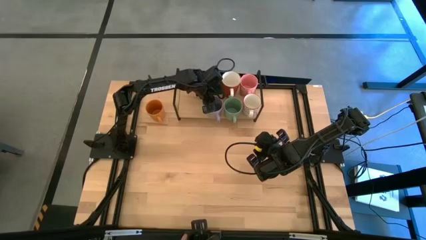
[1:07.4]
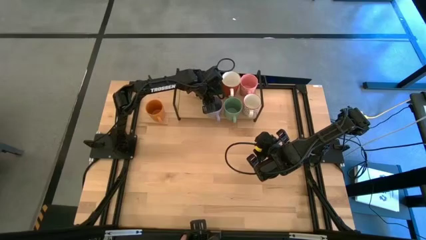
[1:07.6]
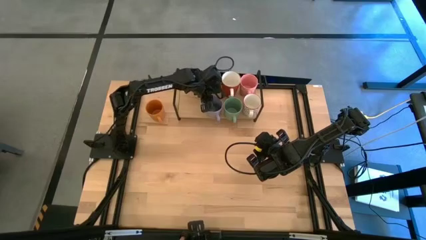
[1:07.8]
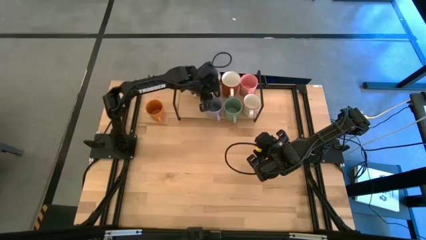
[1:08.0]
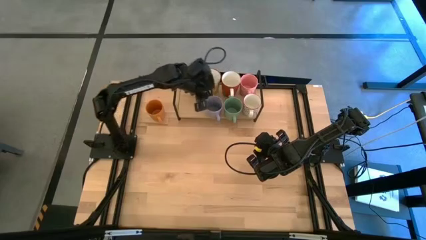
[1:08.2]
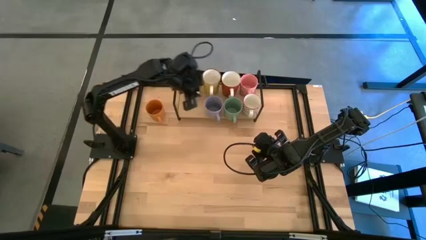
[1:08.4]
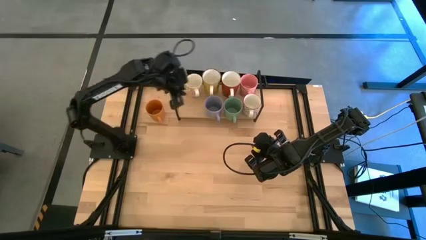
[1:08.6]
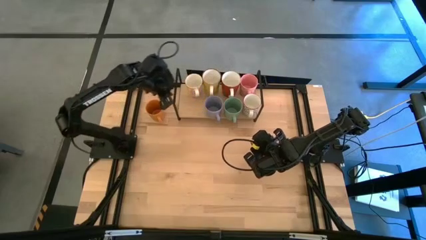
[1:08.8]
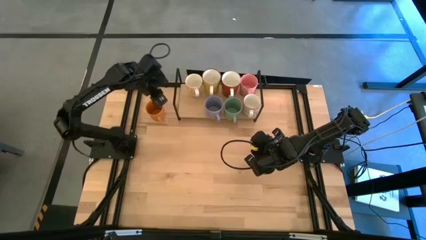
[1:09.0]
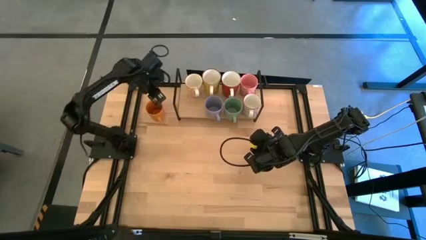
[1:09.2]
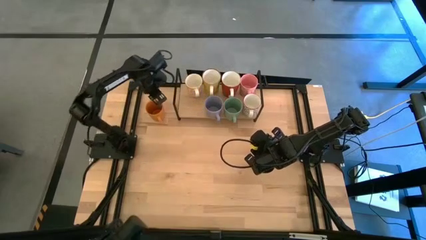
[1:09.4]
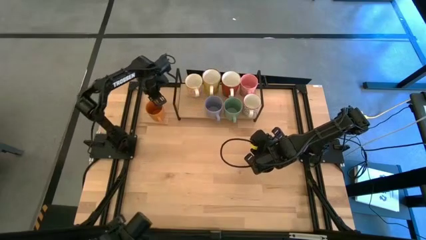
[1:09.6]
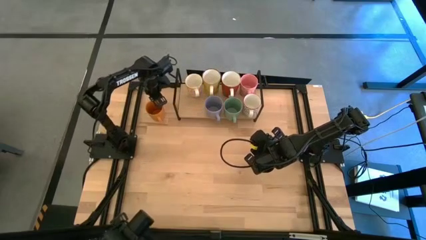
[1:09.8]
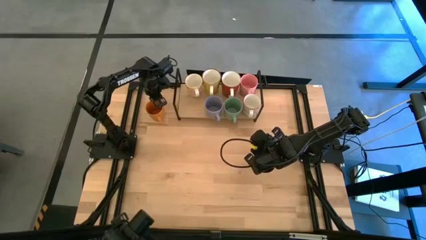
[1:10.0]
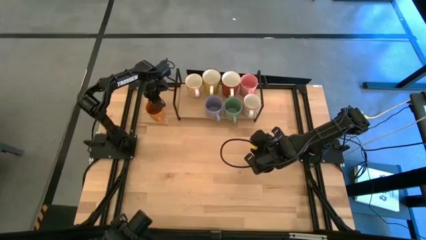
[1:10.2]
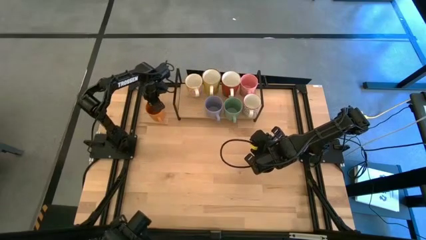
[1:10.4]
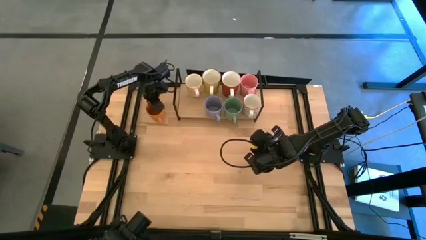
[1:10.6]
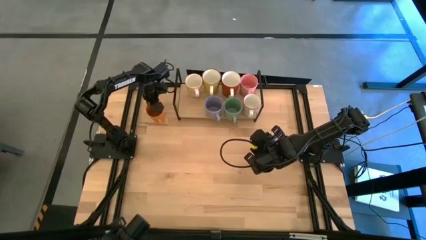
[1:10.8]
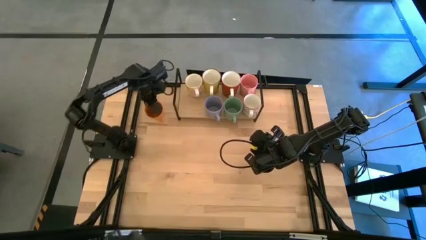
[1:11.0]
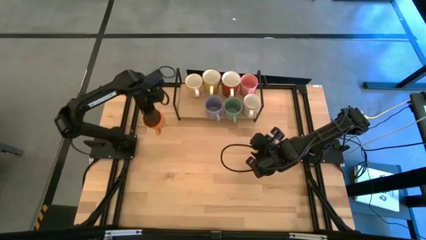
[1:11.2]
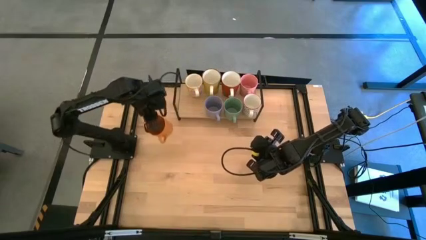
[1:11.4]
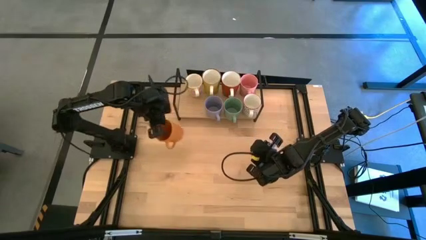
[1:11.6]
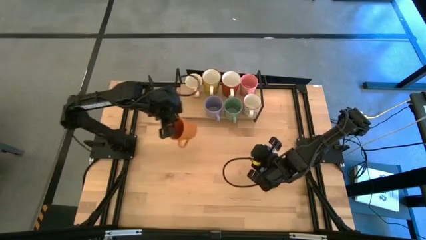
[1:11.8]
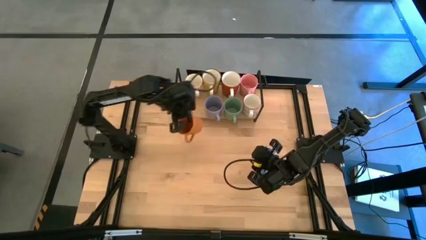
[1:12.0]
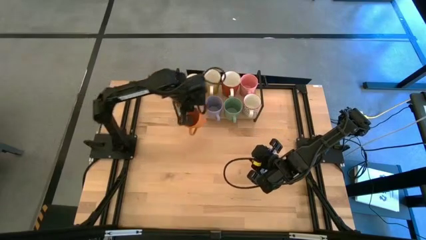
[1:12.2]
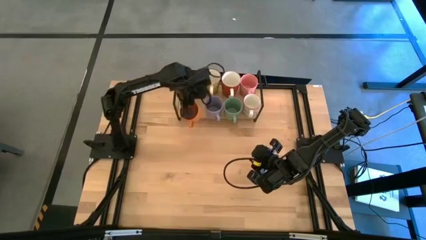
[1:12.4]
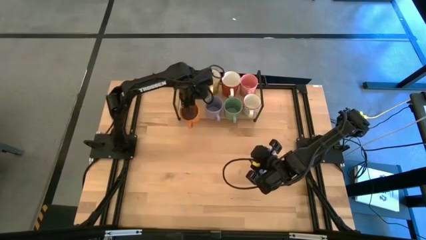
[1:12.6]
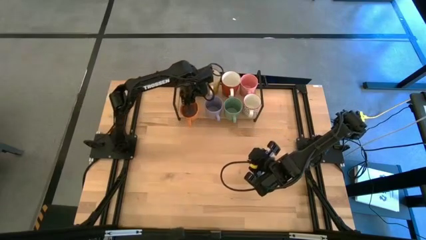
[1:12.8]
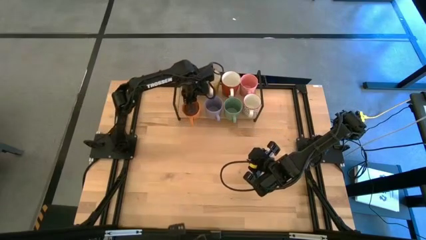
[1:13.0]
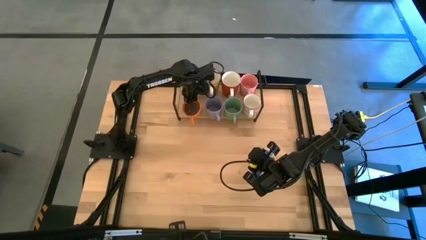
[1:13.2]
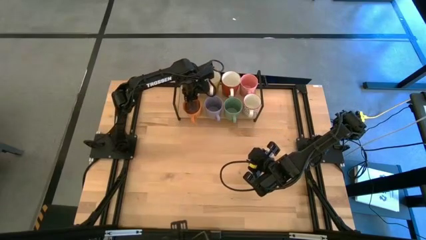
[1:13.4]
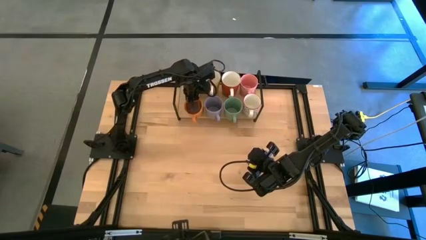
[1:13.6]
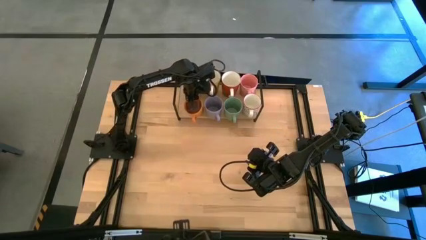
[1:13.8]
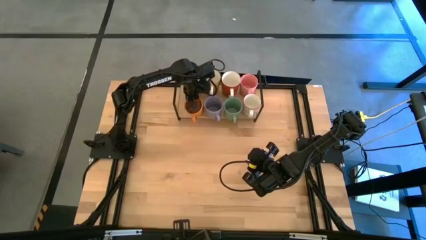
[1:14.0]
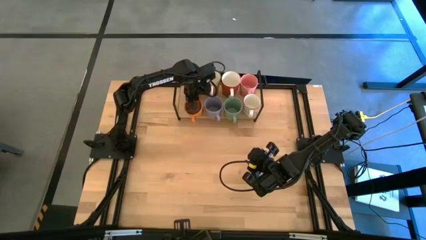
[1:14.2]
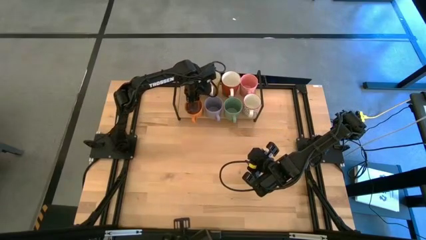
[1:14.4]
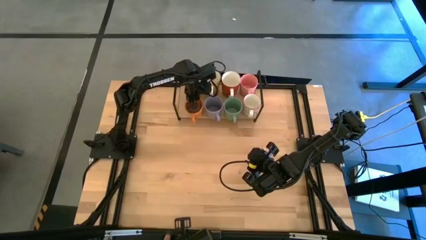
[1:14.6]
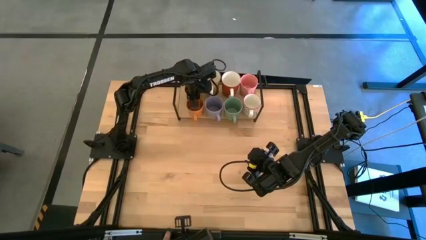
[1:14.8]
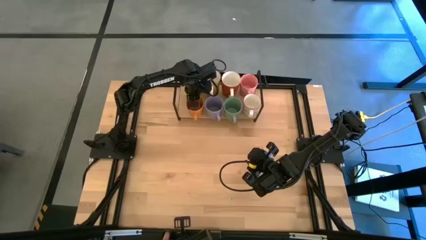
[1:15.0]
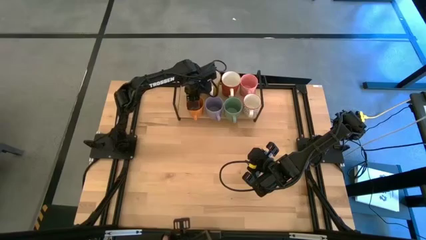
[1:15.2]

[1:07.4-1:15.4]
Task: Place coffee mugs
Put the orange mug on the shelf

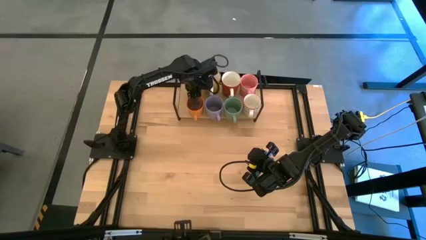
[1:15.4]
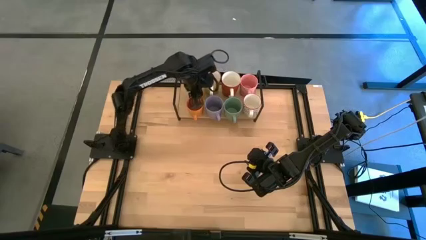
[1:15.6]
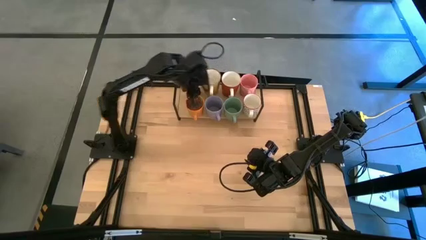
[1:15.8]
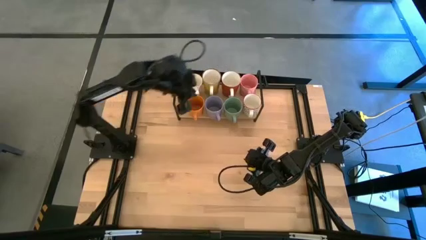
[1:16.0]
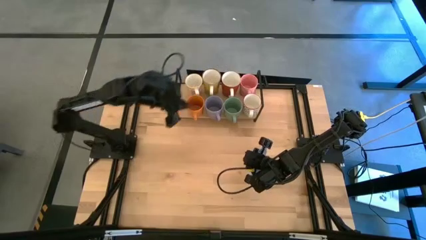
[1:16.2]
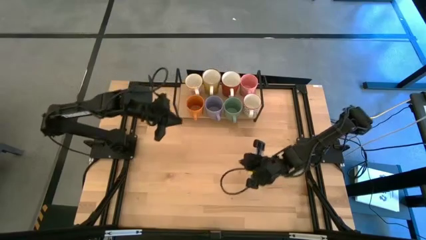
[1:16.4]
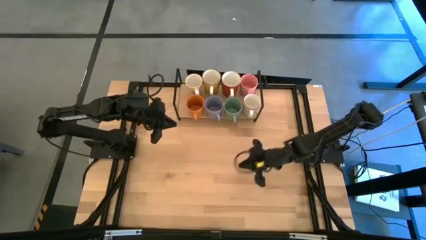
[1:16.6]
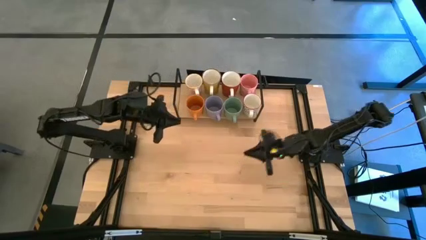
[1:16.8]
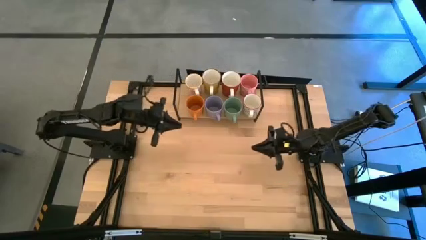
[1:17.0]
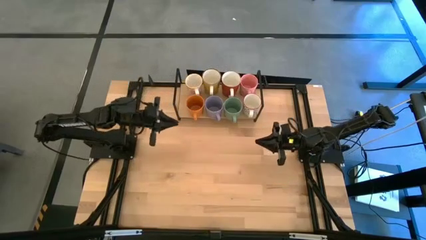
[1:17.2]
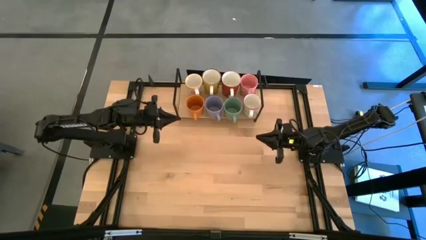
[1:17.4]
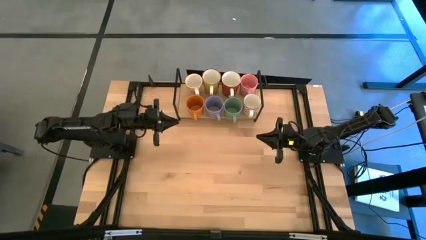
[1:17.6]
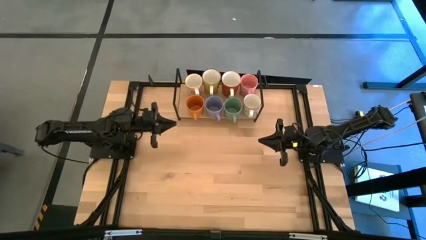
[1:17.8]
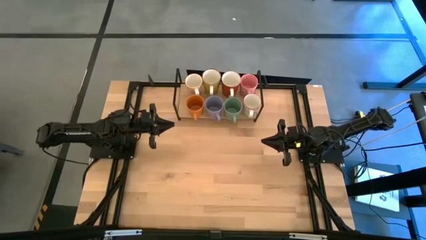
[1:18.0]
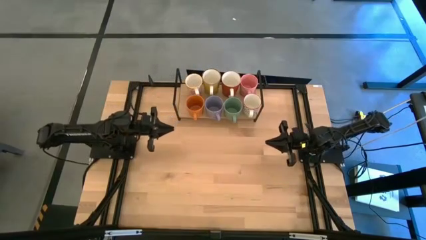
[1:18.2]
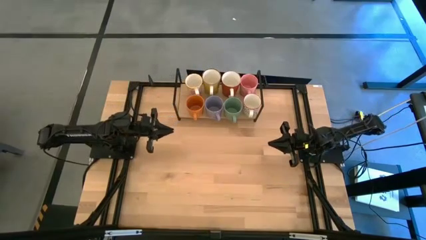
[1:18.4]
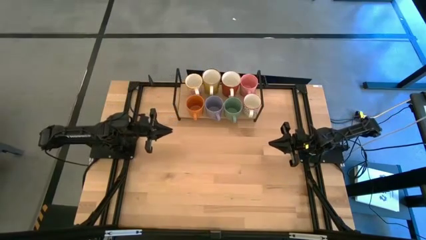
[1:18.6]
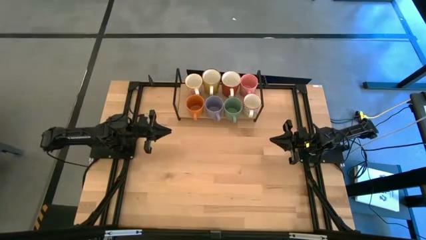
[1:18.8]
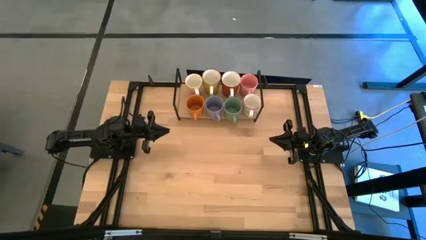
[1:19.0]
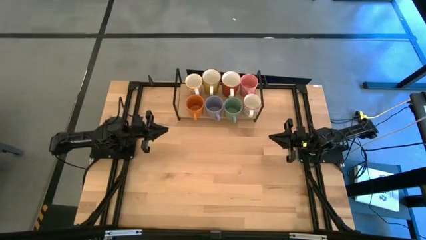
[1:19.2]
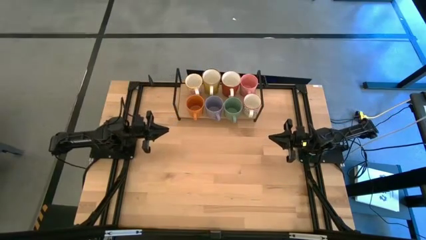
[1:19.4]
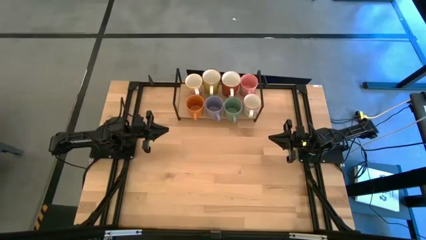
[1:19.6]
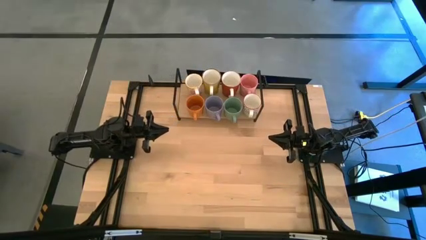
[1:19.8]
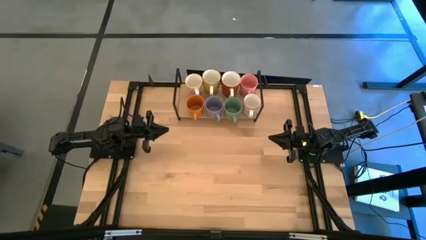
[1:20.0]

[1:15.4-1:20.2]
Return to Home Position

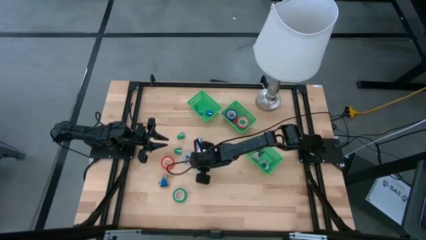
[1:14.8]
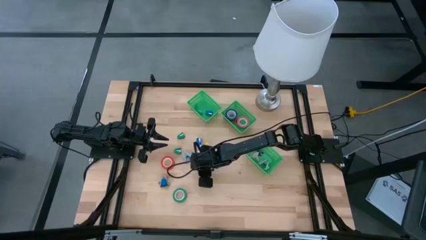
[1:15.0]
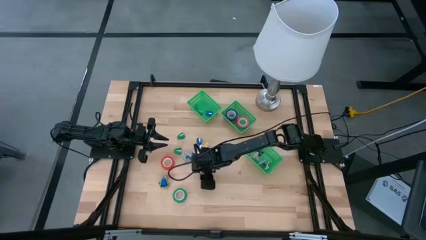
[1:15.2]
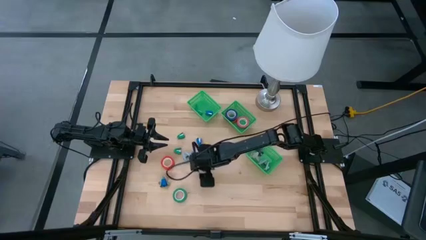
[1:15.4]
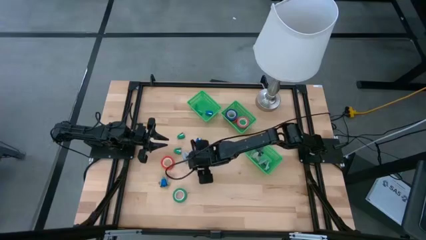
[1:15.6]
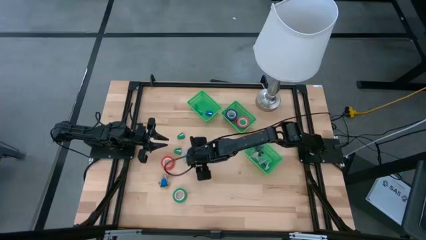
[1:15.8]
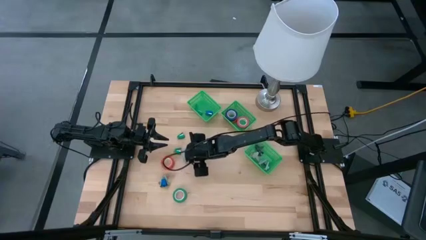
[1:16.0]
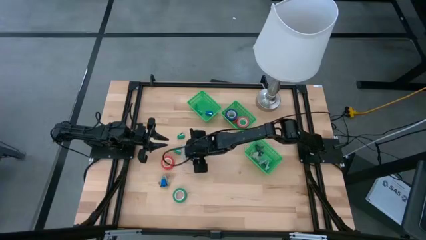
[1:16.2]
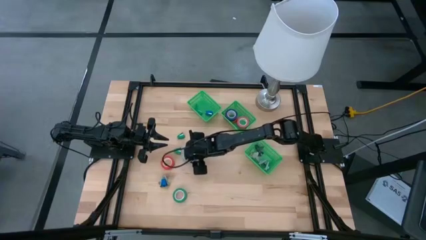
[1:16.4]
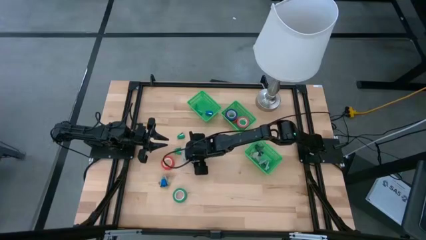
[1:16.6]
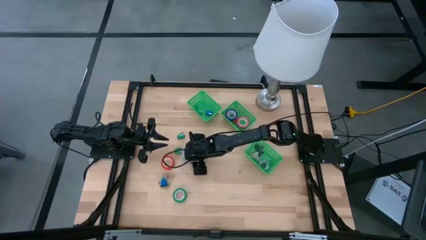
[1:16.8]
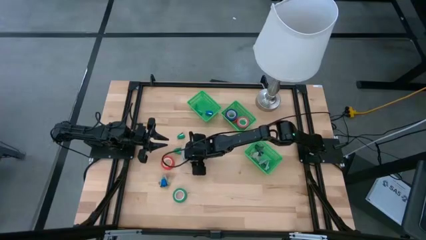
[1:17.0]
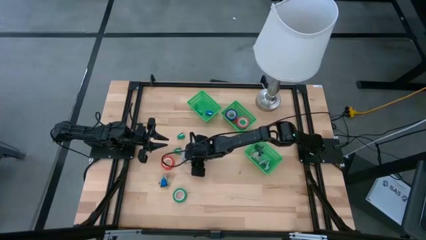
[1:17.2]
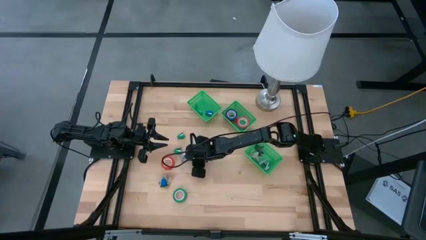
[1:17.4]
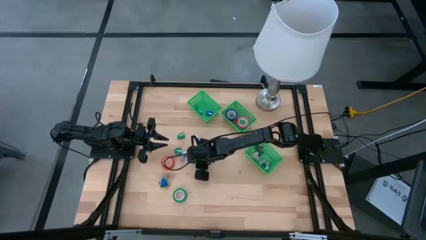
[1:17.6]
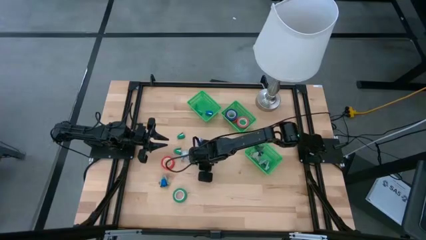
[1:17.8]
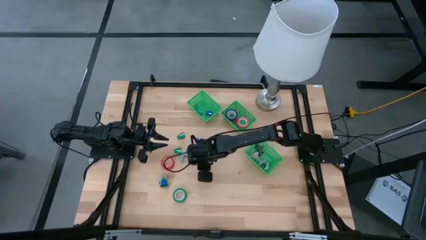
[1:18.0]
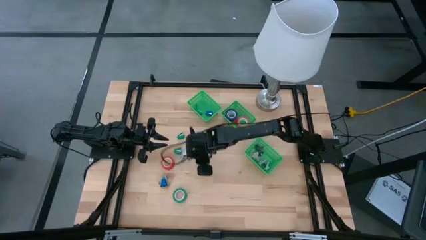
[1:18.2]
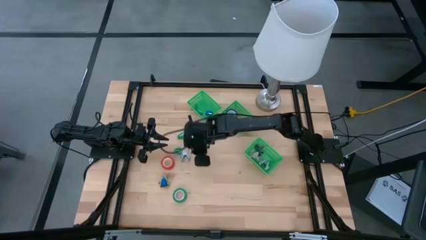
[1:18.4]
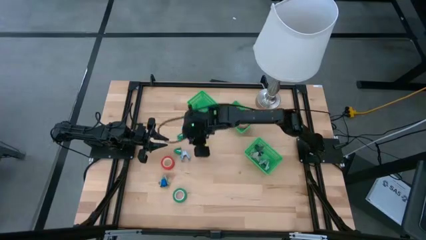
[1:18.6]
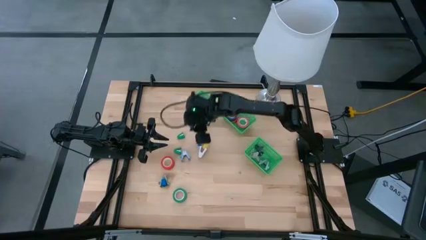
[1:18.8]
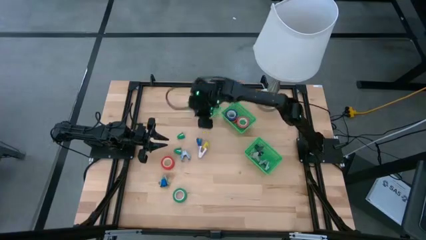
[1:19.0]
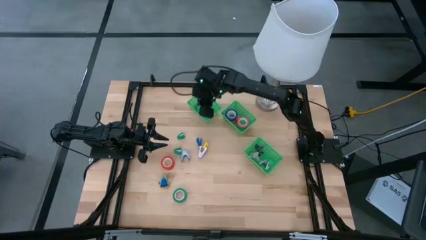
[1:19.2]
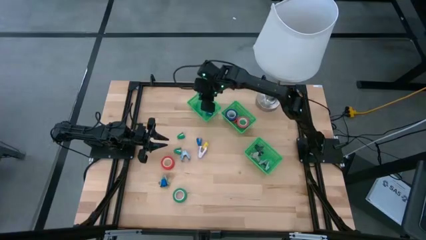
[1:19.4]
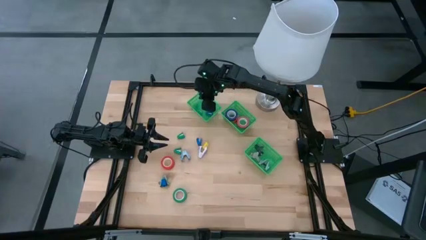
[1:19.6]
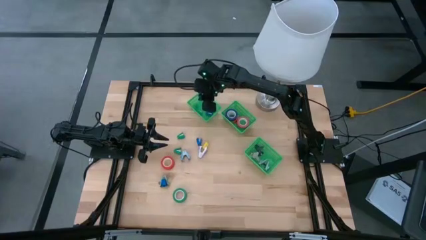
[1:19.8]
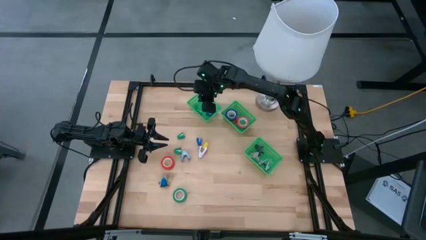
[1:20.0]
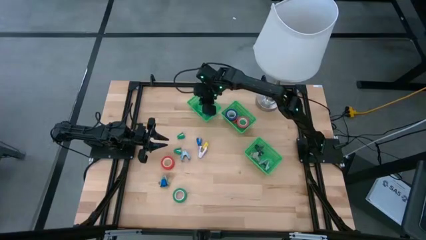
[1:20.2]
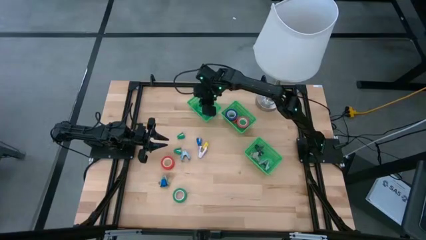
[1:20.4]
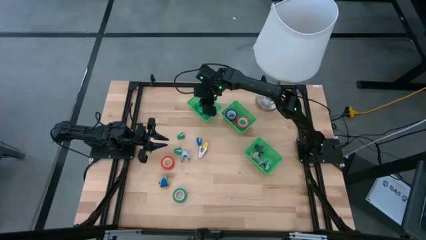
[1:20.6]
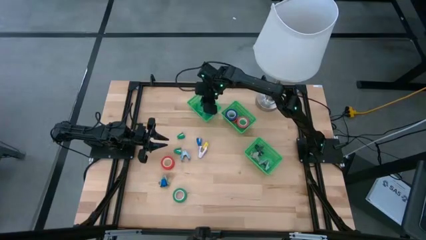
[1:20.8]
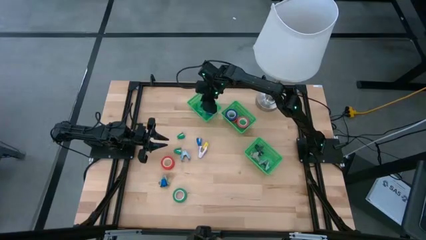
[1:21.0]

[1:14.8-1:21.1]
Task: Pick and place Stapler, Stapler remover, tape
Put the middle blue stapler into the top basket
